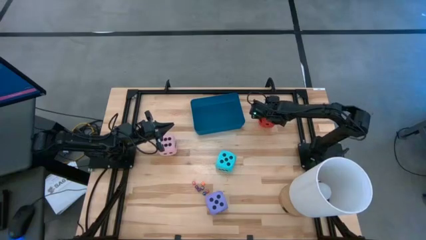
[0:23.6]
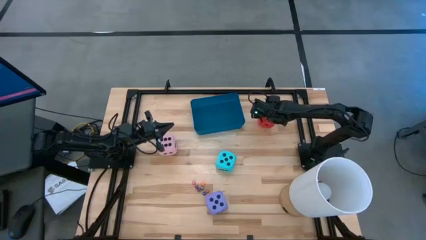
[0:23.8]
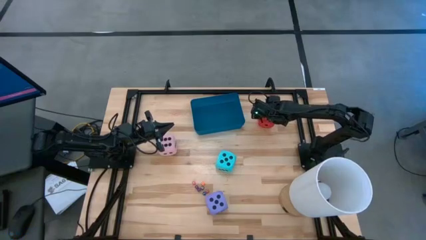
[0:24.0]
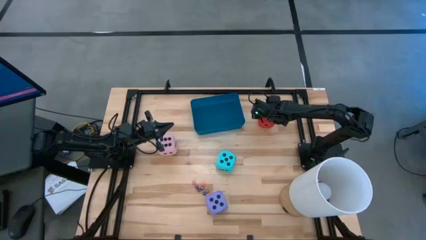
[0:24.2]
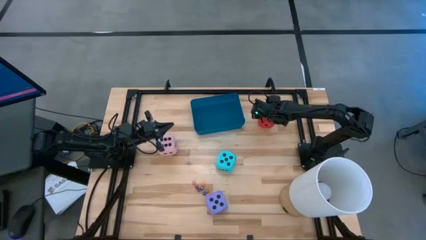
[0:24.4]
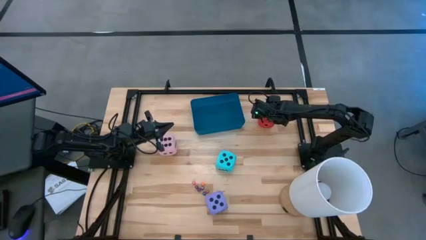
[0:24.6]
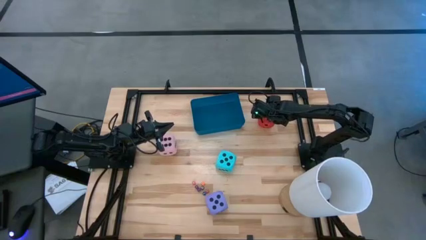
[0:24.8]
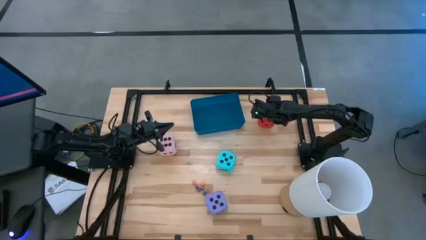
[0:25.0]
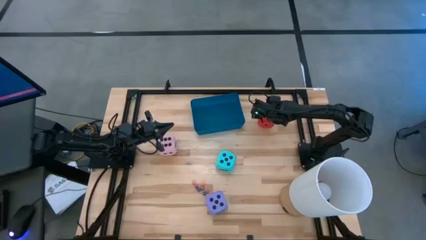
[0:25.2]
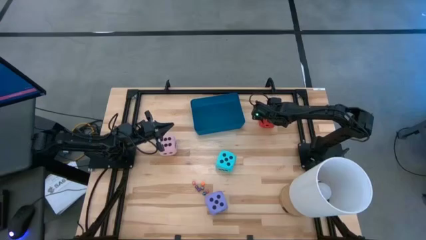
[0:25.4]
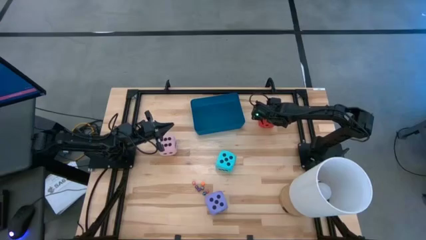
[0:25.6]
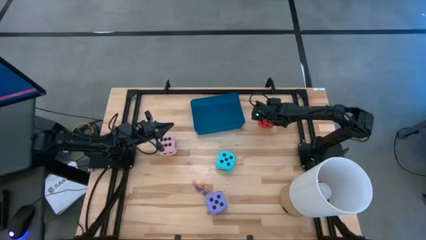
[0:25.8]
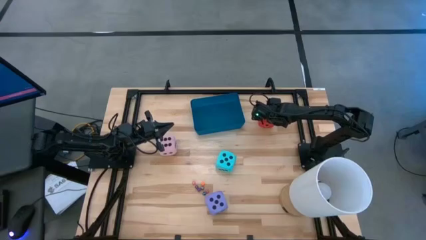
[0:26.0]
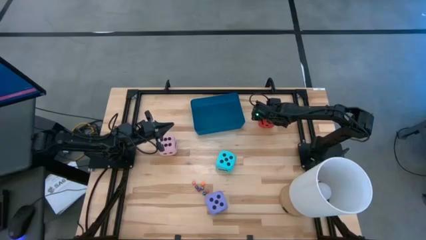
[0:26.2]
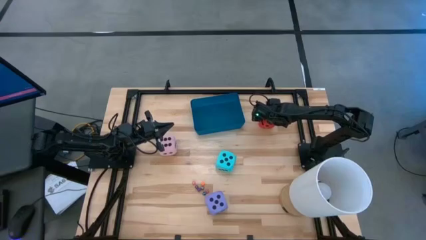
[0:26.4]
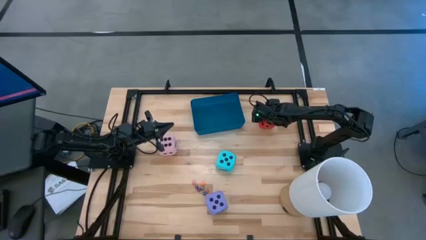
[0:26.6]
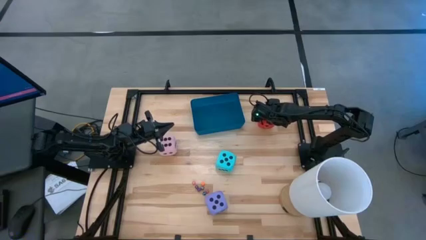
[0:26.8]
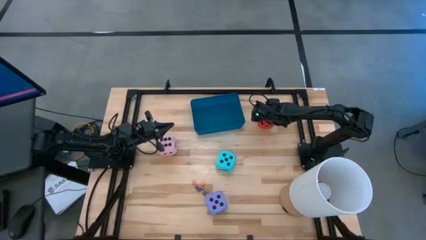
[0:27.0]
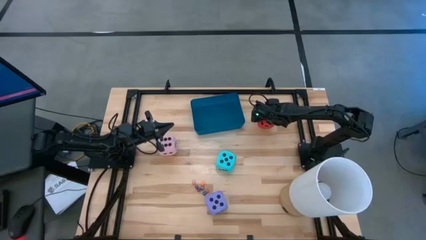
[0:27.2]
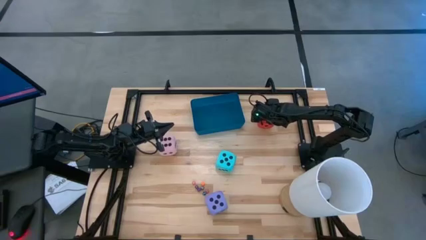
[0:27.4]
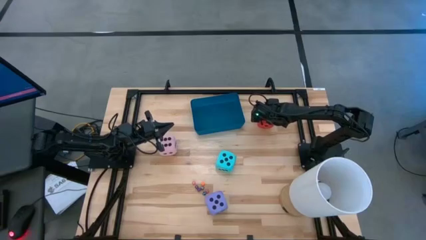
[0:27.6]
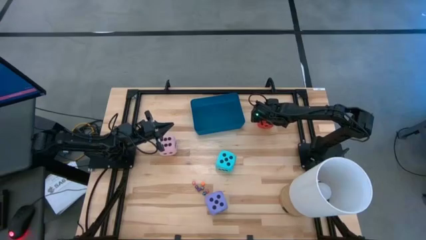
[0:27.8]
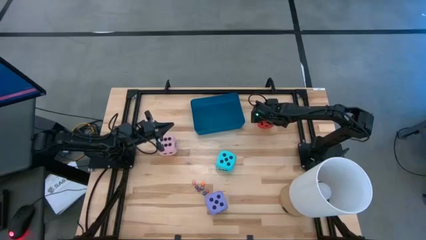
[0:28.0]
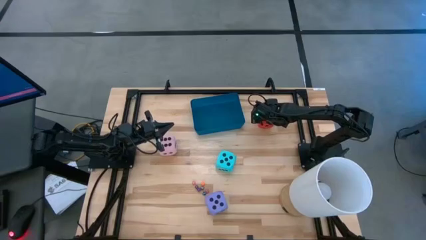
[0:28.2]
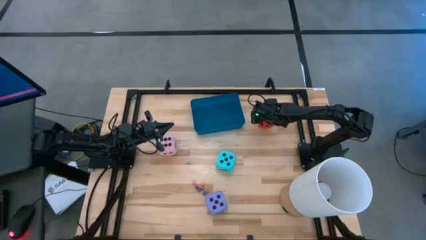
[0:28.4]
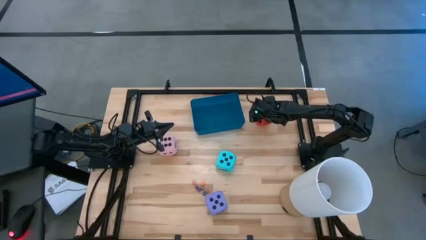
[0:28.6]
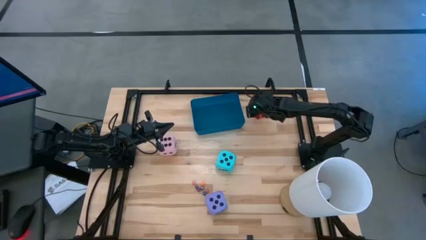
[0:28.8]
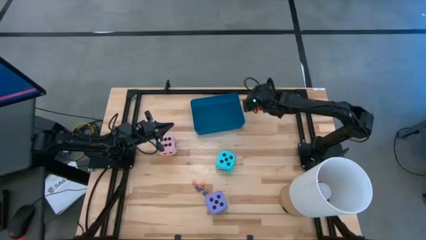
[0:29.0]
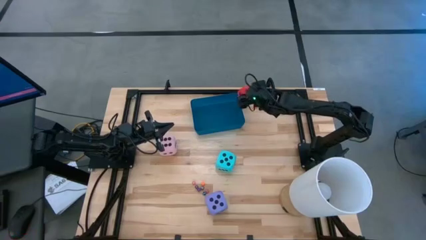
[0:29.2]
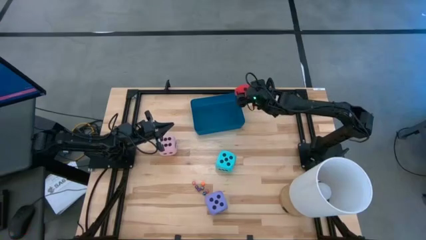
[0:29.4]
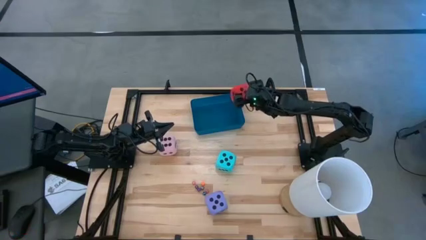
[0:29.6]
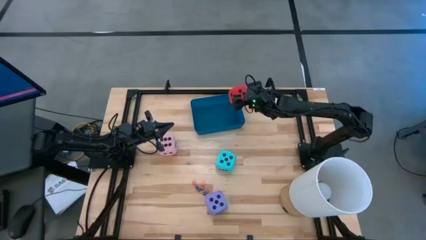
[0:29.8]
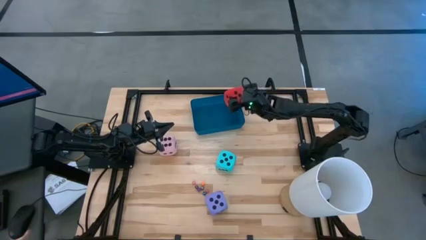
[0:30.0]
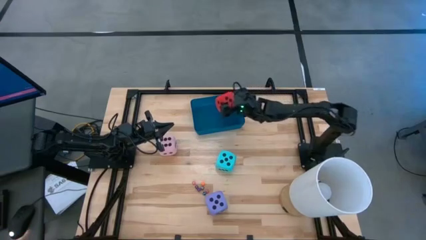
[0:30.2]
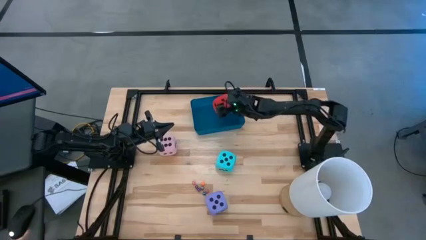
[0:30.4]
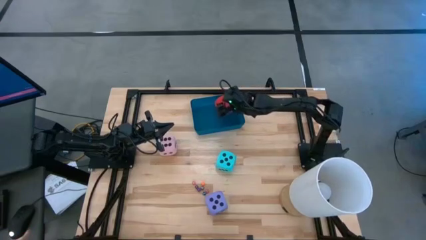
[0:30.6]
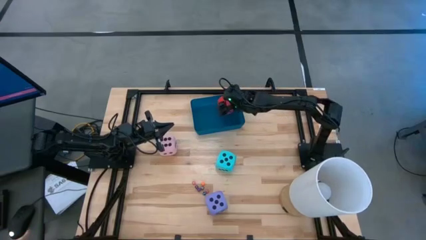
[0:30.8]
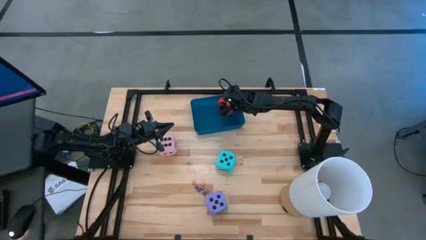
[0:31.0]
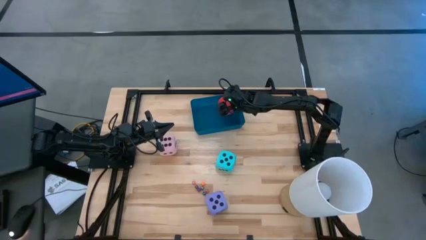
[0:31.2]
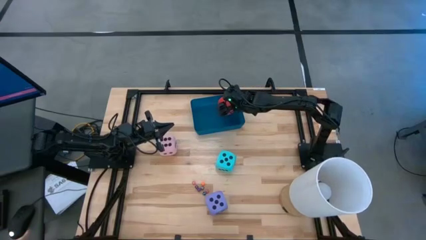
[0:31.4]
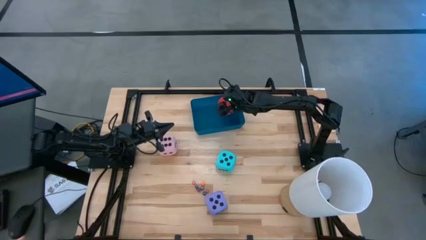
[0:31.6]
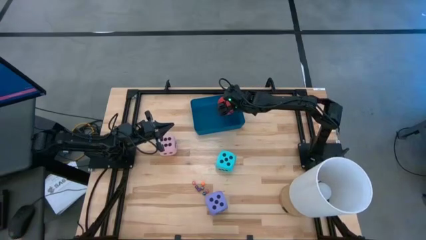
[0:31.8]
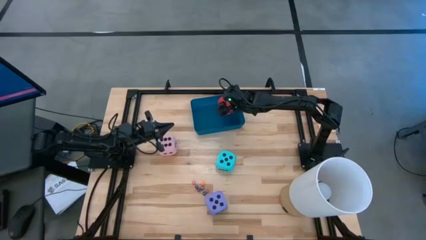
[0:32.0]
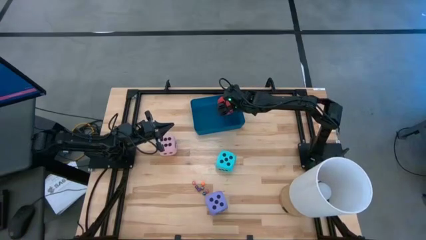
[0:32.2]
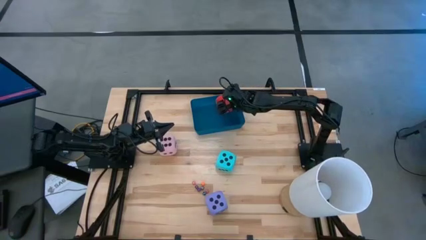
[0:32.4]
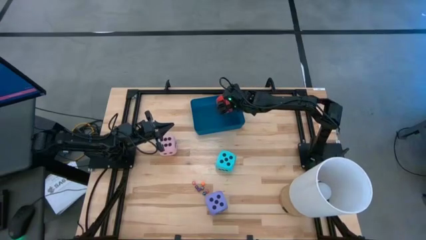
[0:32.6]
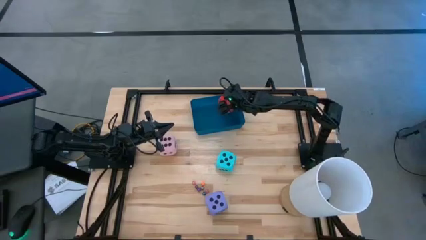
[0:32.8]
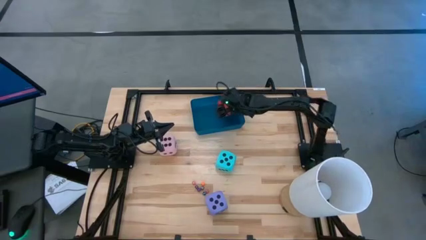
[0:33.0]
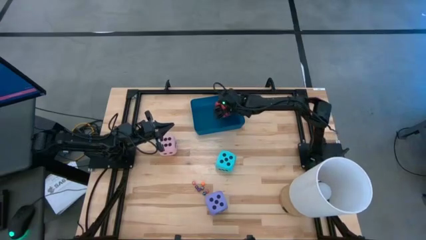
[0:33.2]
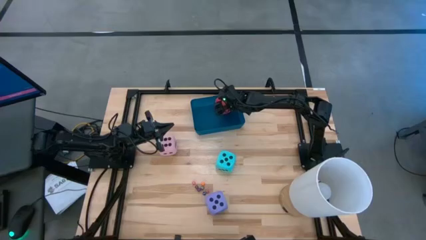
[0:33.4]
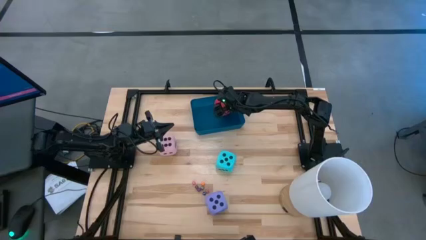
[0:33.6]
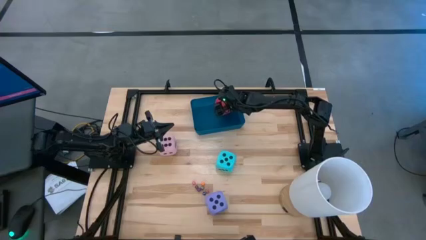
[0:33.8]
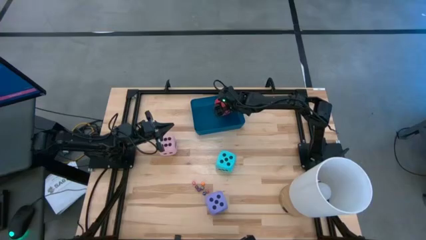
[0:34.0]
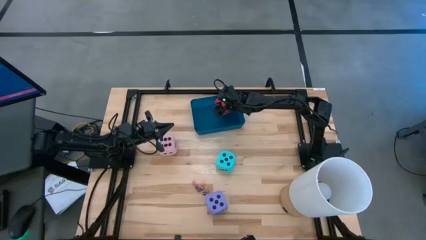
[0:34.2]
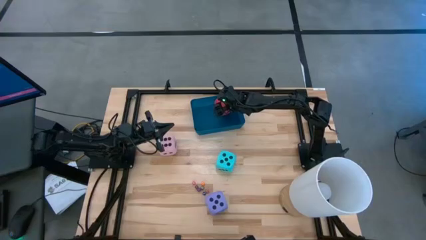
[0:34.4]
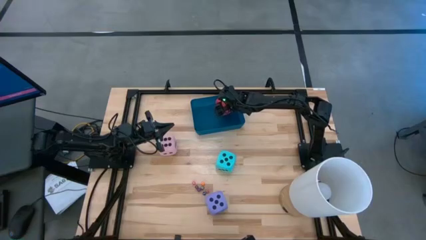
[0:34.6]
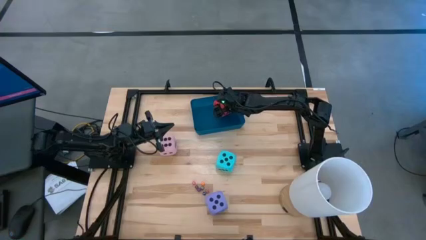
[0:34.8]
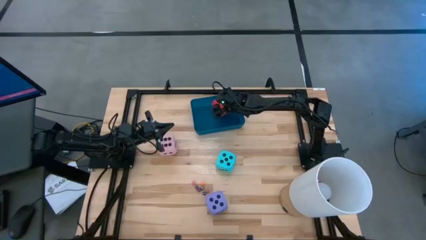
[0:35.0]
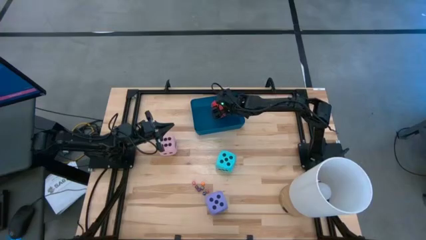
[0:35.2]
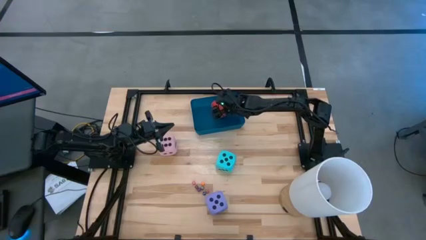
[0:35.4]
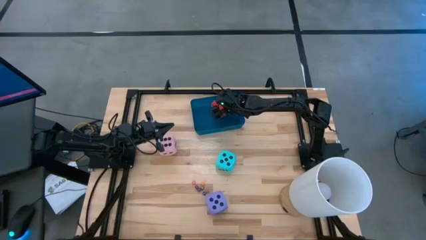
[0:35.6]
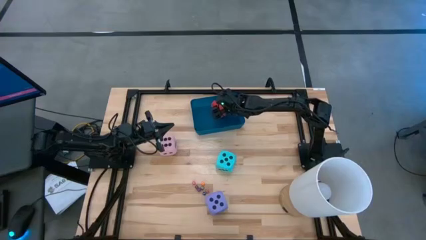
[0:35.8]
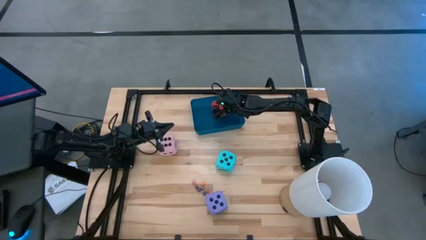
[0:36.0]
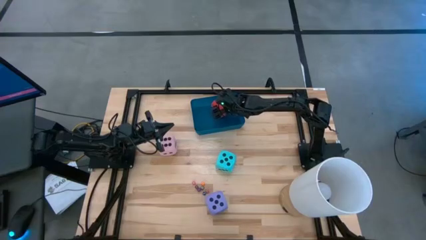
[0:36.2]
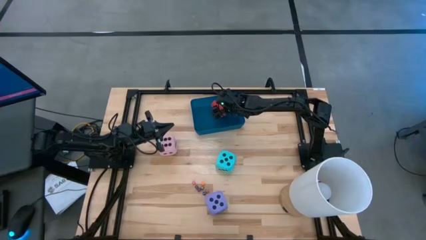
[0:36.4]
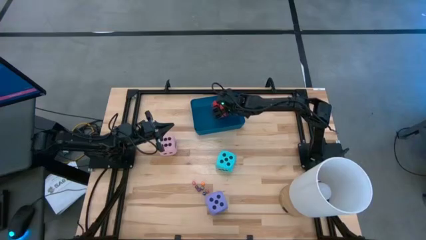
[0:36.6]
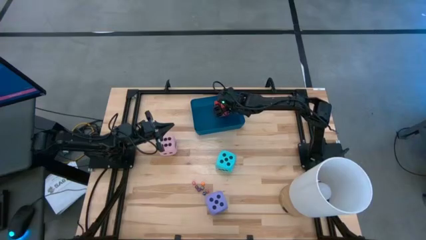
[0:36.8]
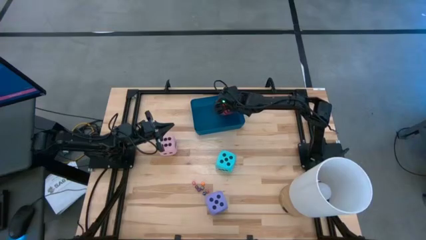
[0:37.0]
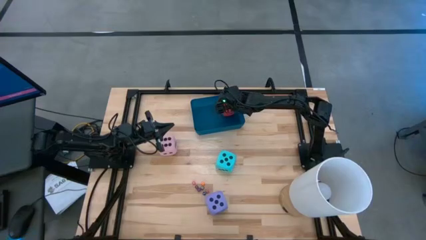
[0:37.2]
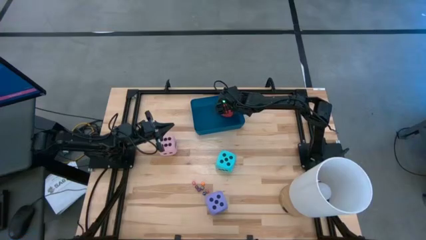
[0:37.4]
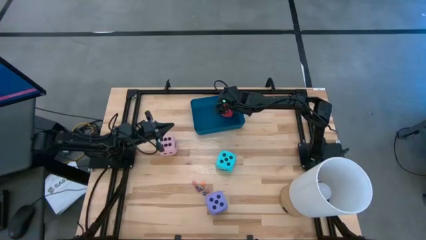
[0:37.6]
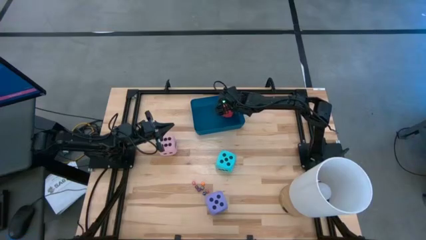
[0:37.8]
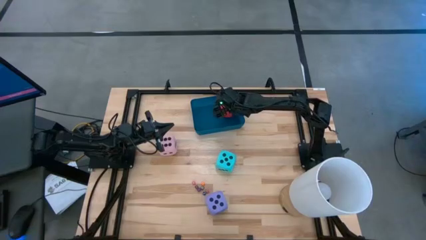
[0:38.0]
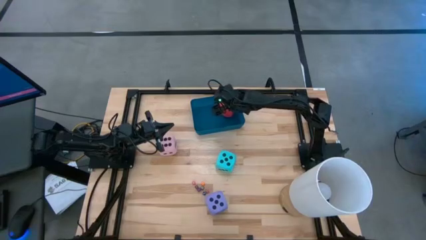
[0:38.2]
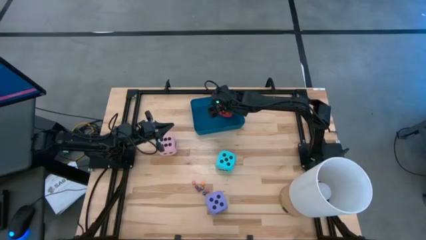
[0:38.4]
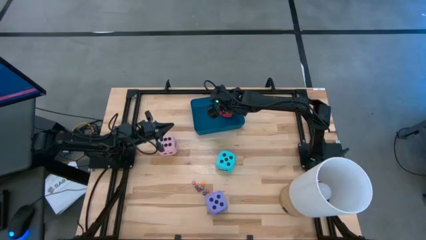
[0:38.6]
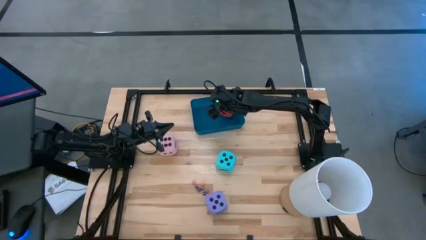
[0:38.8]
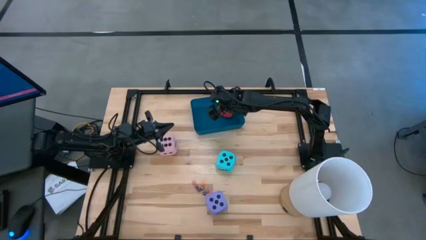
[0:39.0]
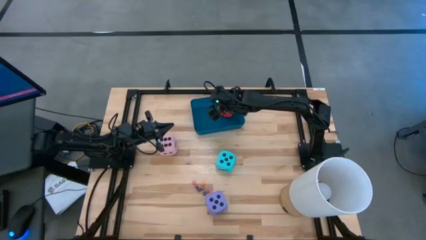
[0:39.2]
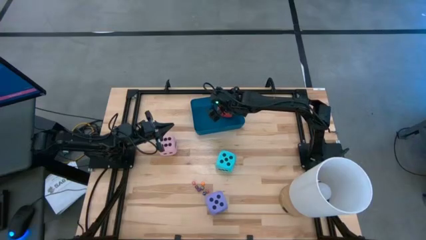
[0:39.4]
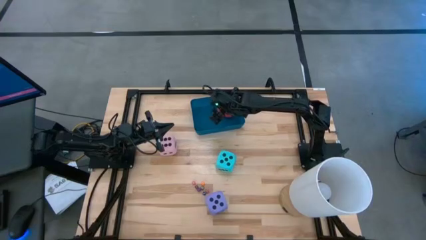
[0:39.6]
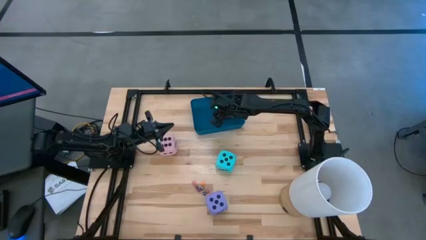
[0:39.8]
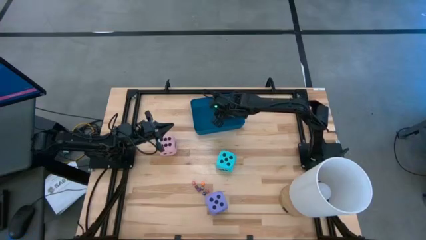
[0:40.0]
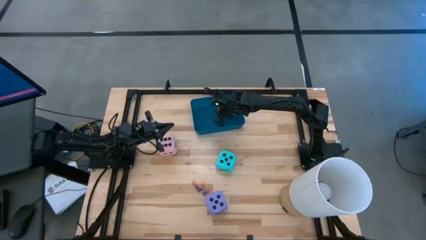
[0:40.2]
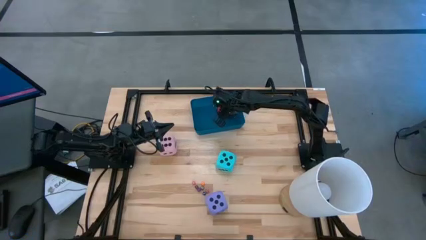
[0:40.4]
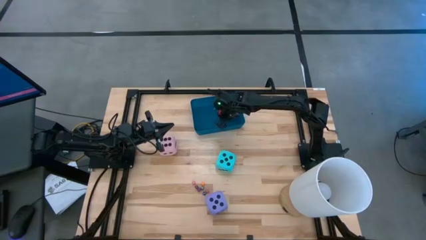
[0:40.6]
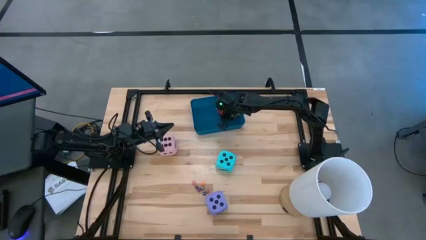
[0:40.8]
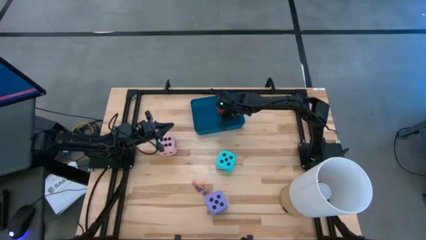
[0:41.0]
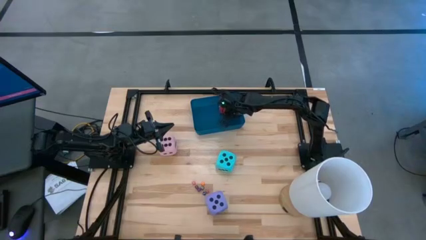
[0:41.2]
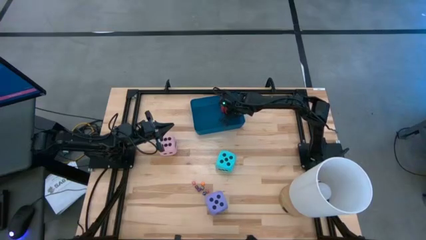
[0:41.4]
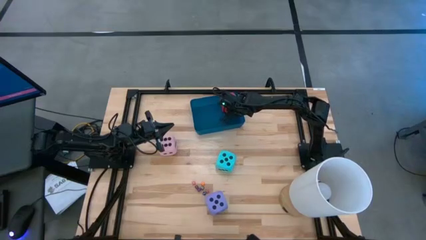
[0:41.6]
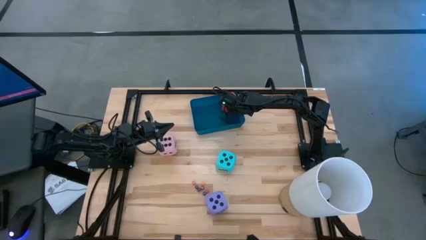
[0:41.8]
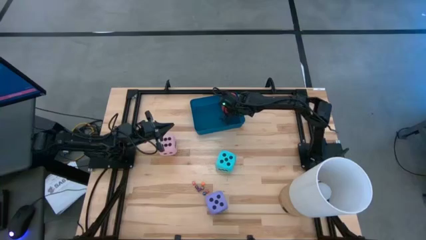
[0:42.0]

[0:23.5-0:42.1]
Task: Pick & Place Dice
Put the large red dice into the blue bin
